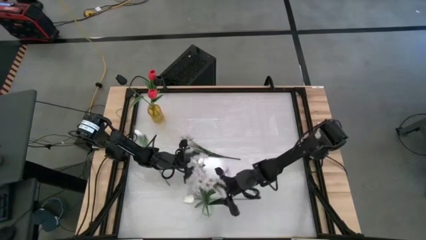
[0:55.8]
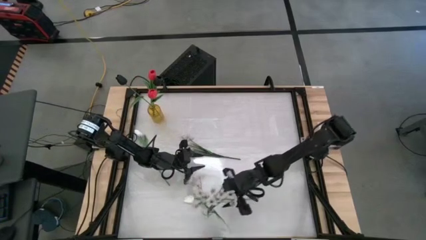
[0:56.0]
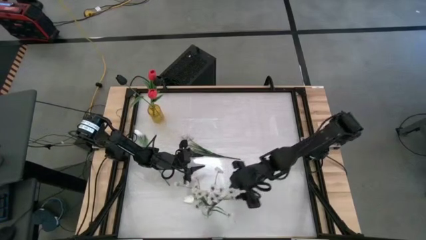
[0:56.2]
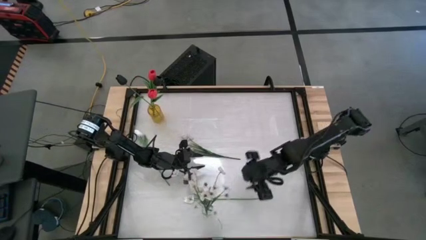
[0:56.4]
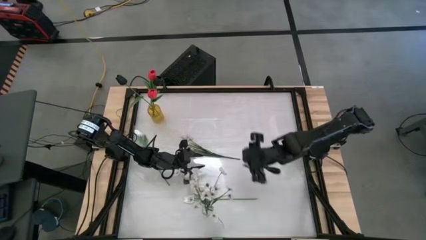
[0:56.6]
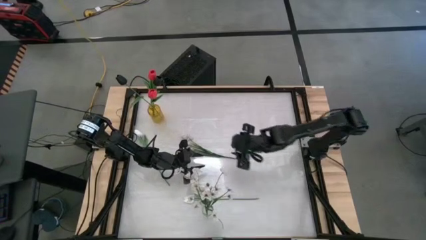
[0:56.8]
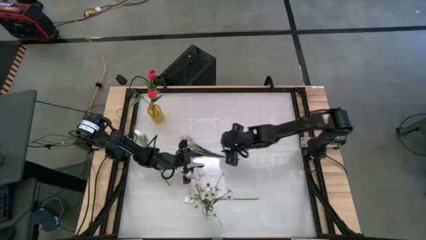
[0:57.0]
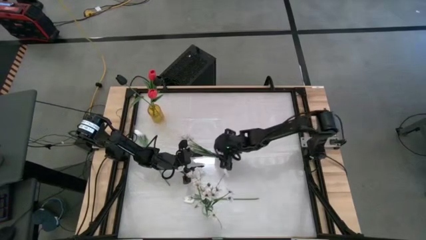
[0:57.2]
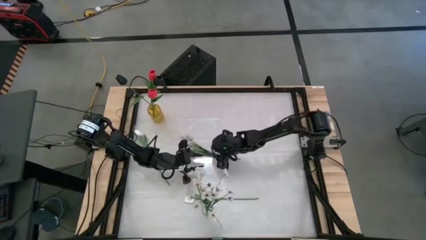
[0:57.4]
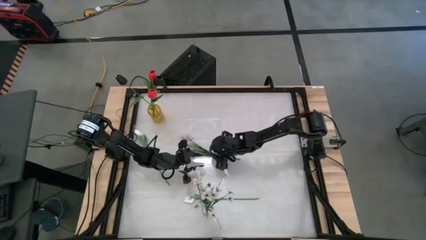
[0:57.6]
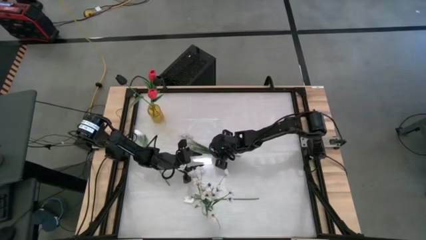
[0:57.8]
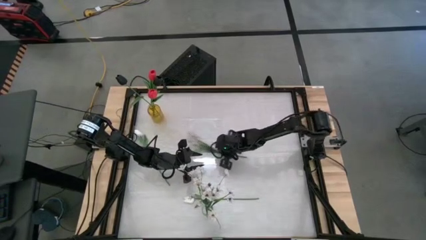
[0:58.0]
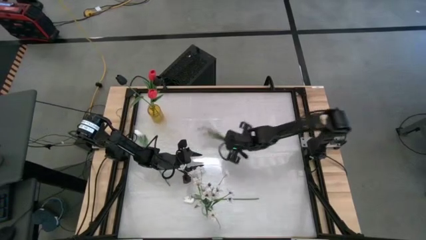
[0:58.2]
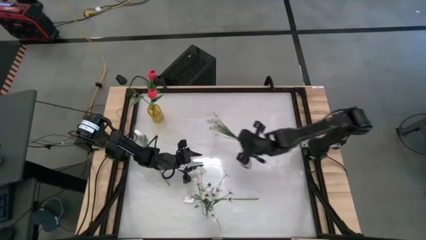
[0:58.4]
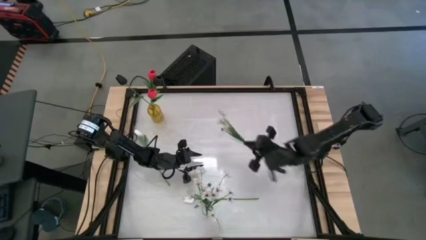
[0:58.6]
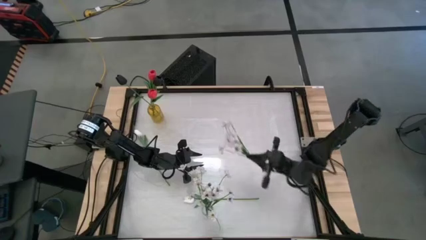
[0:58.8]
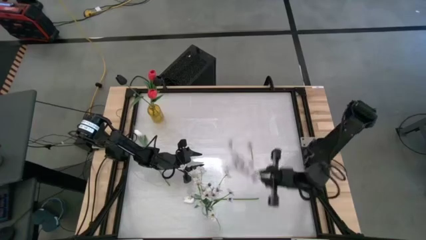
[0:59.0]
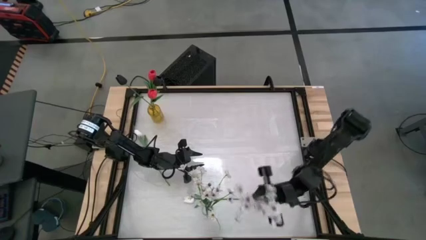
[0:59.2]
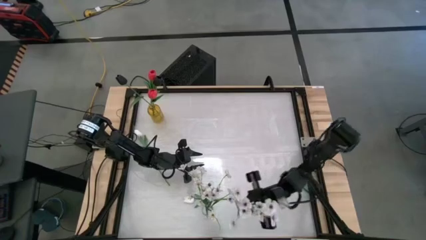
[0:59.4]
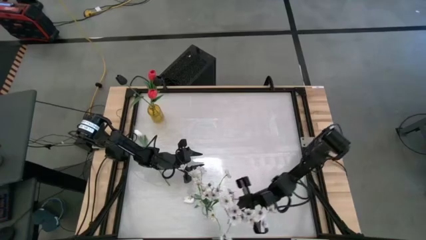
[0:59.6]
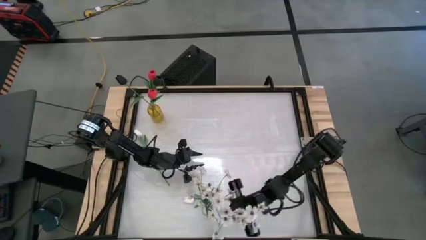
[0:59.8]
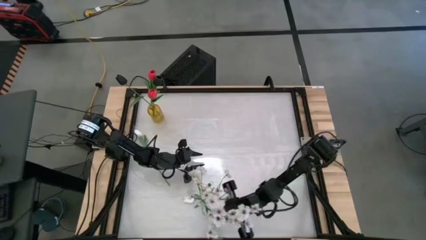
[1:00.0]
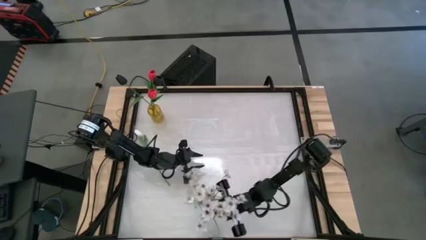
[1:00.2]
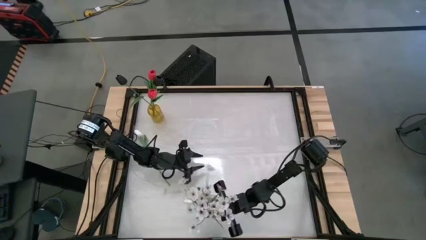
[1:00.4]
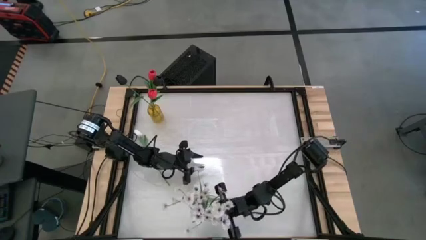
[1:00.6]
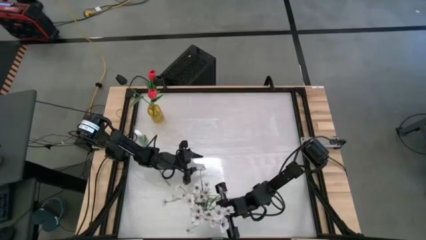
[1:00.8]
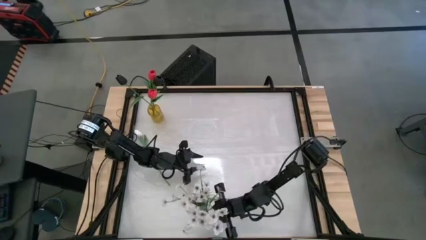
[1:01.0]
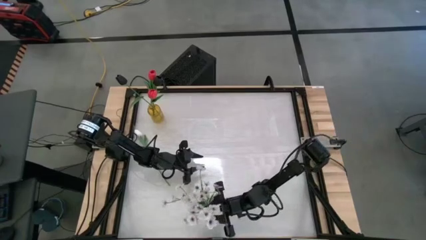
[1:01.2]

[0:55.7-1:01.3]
Task: Sort flowers into vase by color
Put the white flowers into the transparent vase

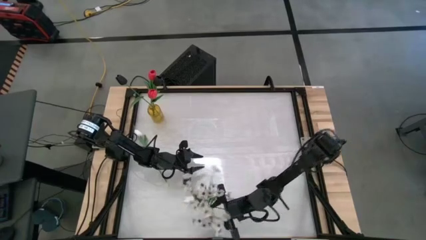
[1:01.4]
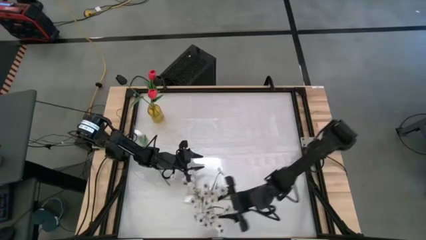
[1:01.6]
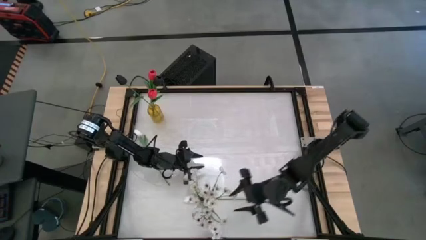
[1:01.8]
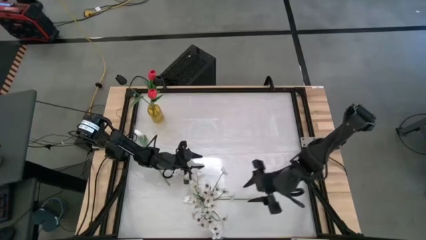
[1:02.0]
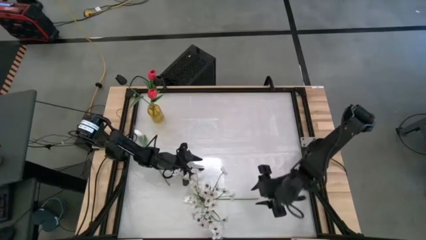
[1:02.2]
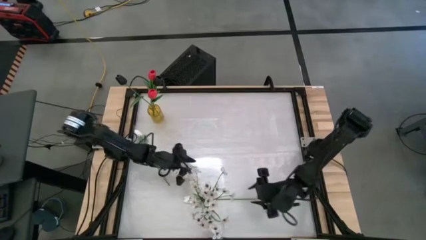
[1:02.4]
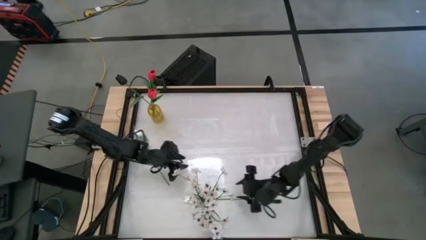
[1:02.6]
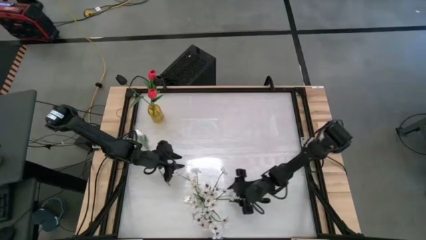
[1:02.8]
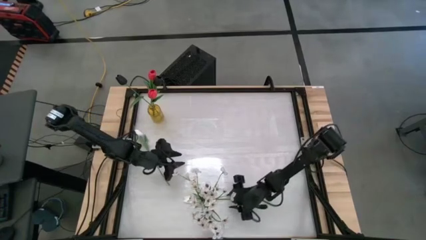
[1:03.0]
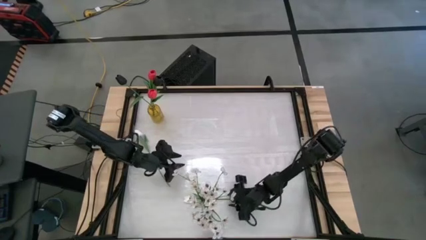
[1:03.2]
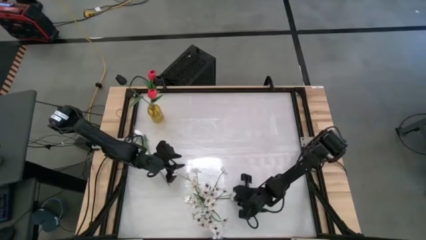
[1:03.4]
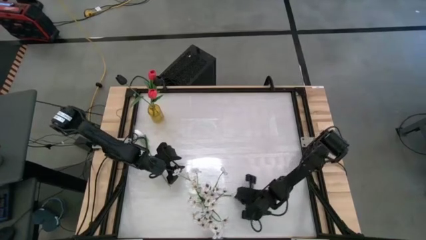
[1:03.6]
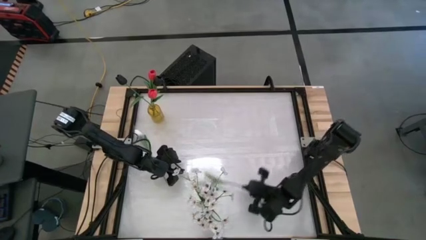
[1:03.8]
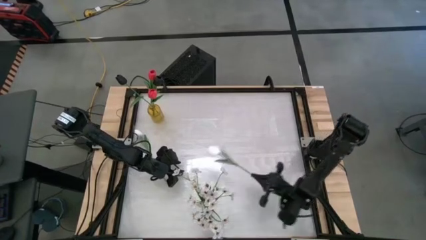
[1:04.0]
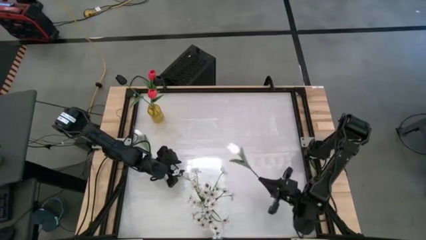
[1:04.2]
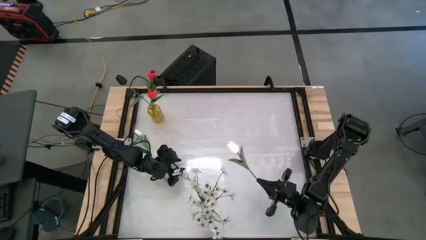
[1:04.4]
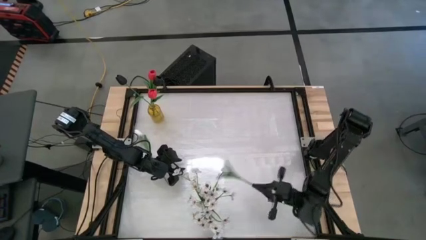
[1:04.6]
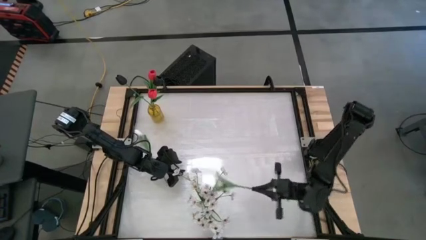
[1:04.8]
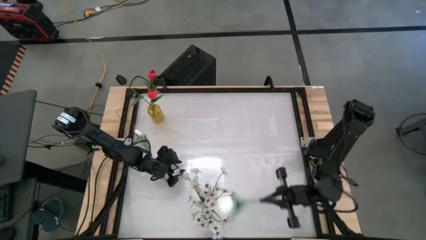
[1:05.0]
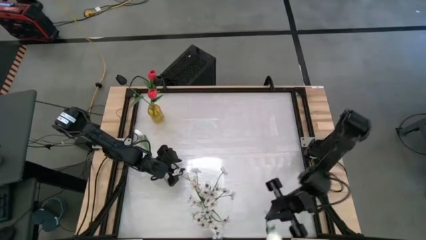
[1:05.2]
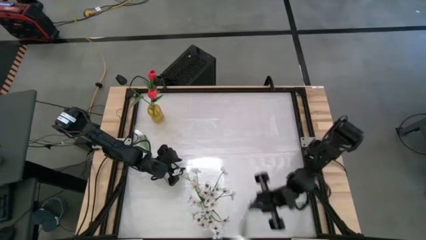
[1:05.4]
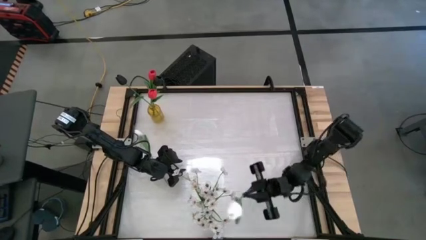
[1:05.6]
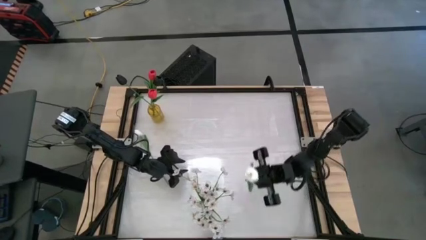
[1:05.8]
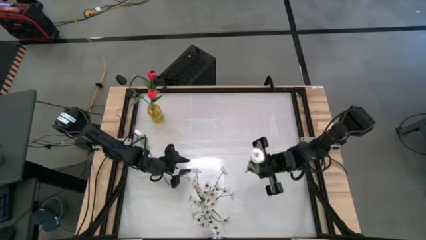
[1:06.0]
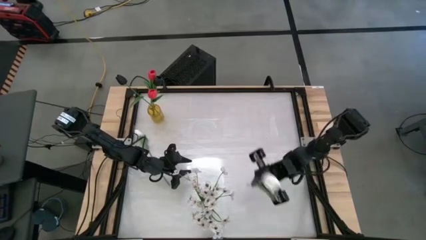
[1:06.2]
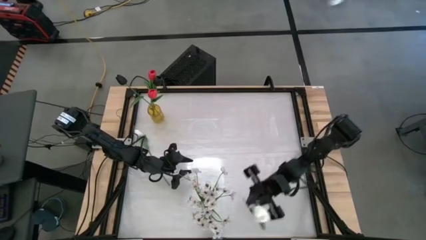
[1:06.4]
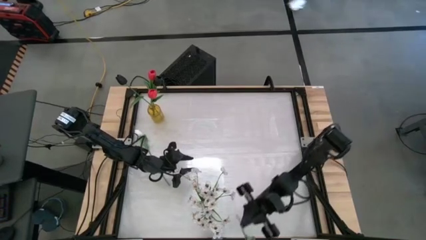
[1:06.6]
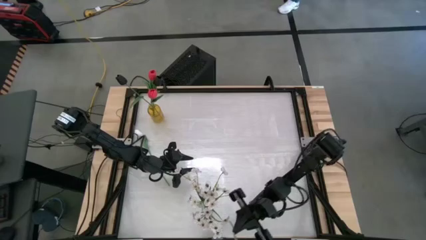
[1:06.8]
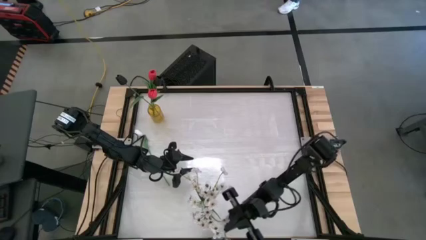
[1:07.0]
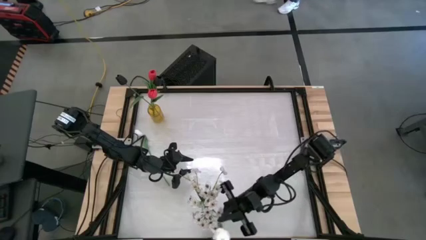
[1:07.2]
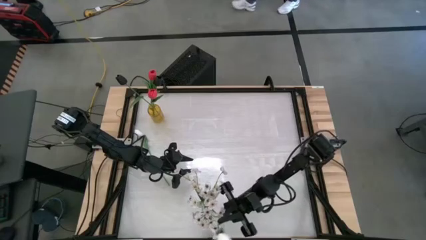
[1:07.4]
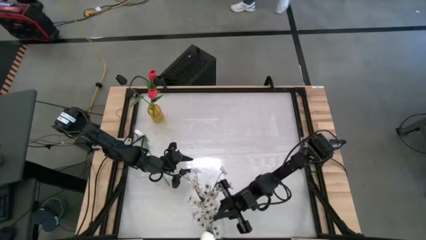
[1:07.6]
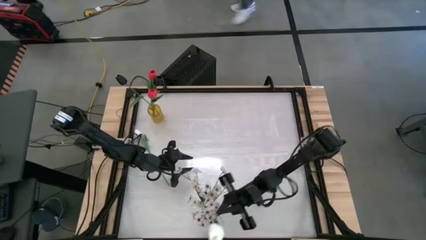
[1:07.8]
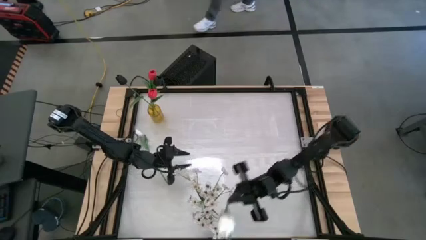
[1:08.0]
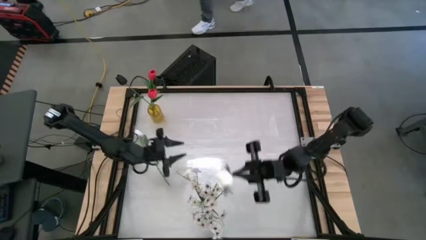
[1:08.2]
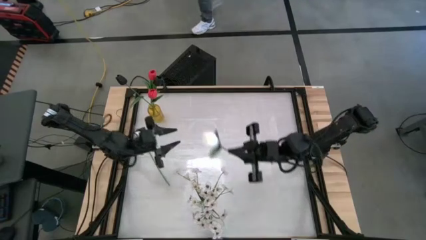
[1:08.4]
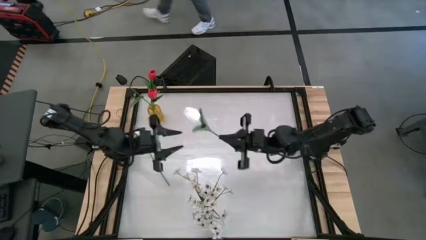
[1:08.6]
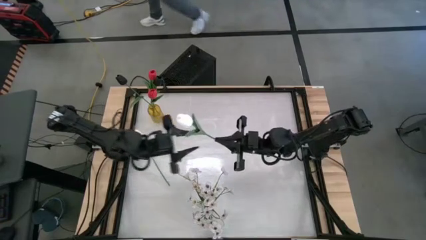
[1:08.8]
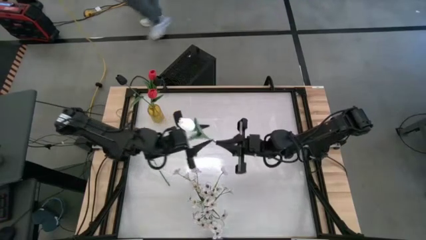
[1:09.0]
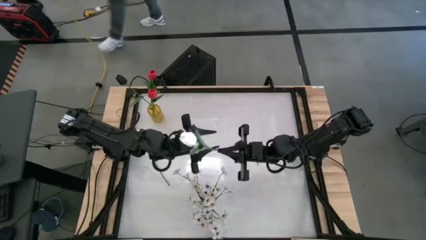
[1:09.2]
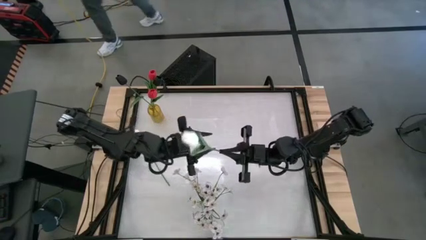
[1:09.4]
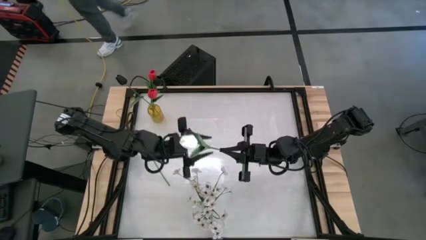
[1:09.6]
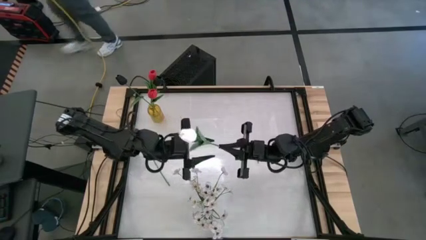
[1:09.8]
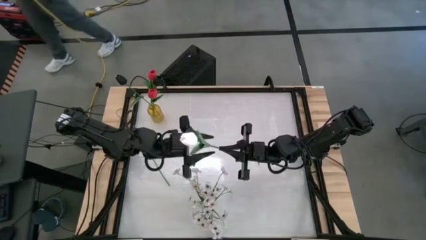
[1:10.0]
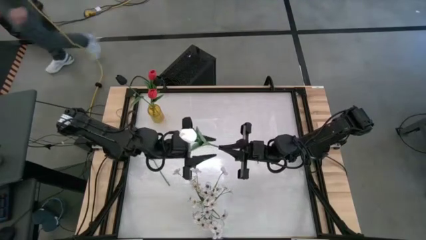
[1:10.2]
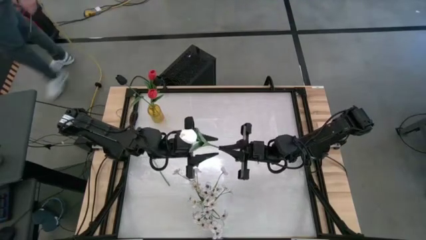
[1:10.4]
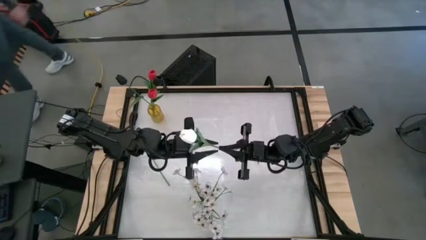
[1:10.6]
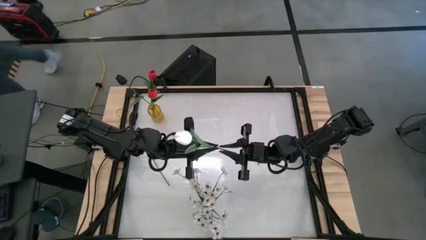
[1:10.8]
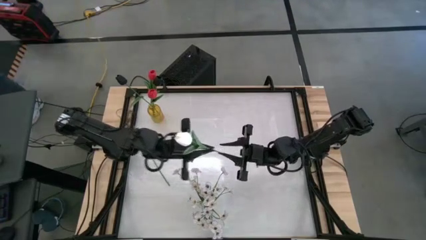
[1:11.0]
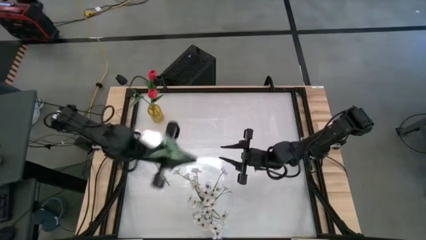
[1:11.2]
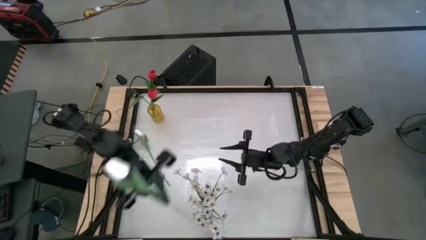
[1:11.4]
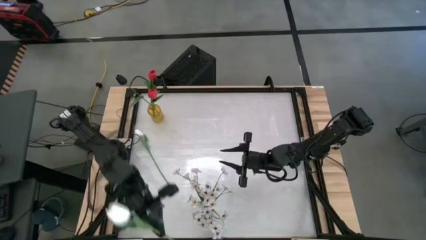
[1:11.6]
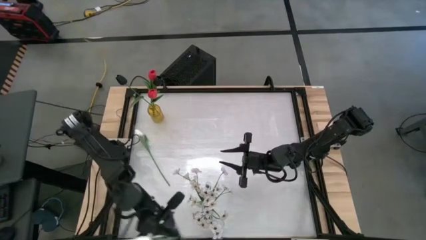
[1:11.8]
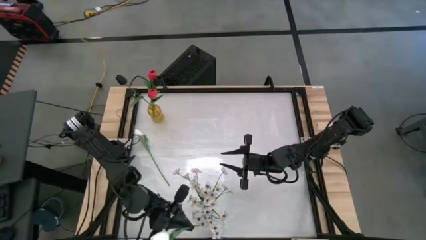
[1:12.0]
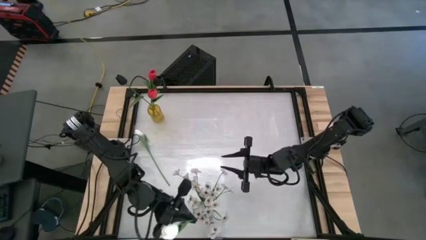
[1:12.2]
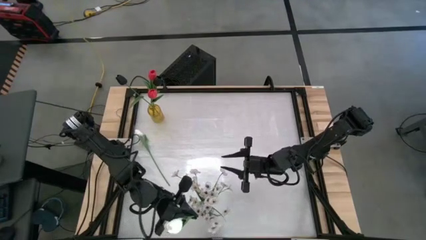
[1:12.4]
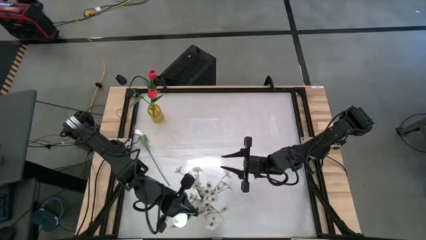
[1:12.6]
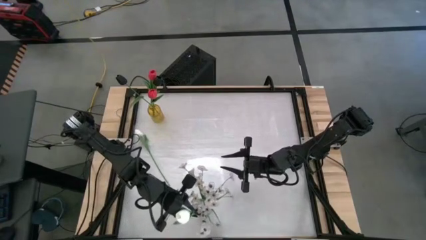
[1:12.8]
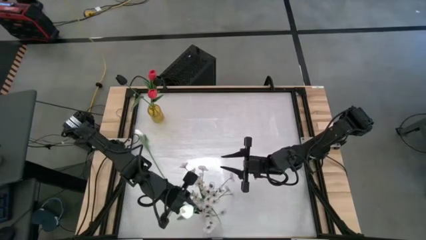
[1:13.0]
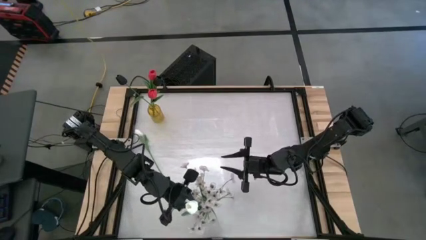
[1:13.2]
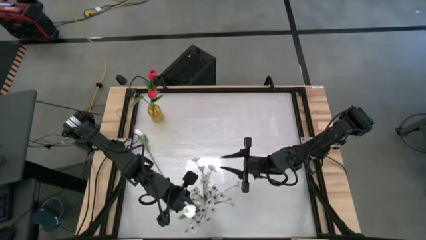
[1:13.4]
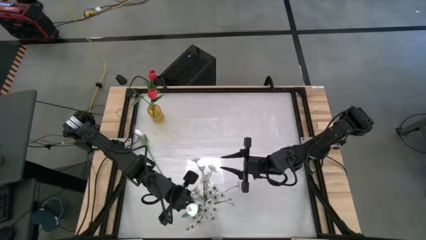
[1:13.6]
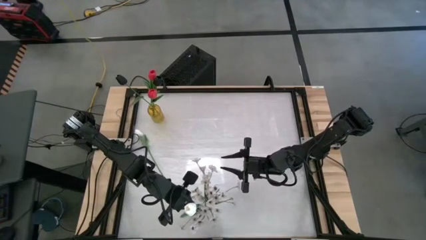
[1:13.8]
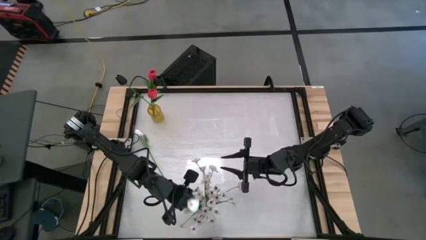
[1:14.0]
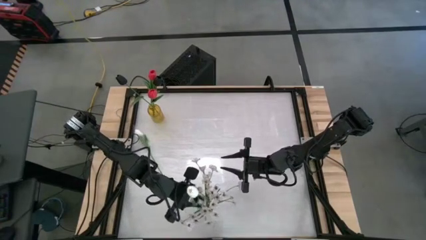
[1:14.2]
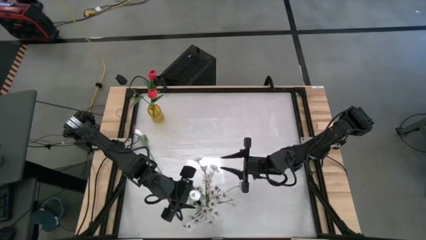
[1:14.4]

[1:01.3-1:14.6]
Put the bottom white tulip into the transparent vase
